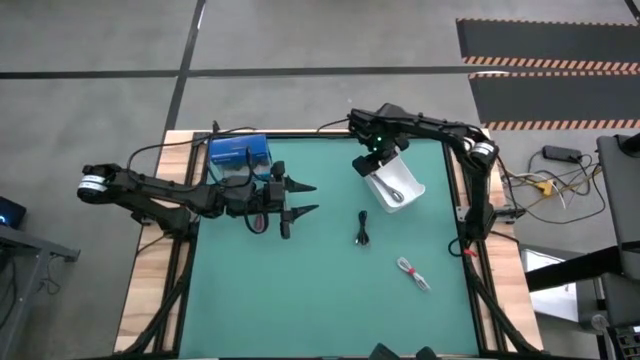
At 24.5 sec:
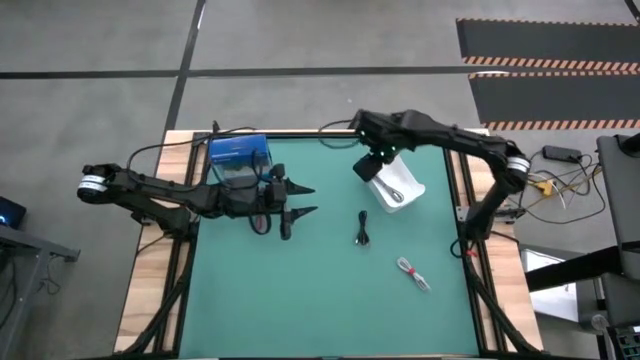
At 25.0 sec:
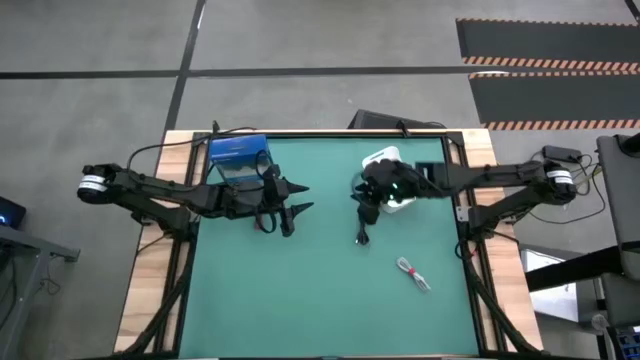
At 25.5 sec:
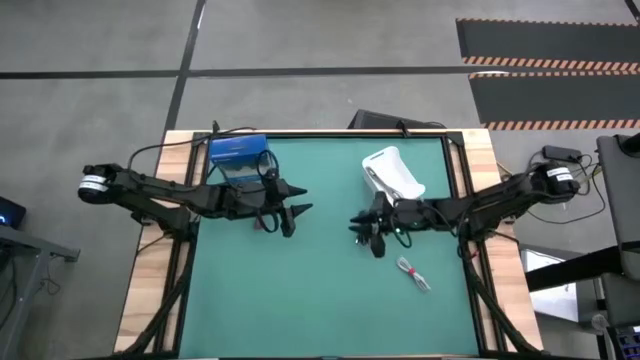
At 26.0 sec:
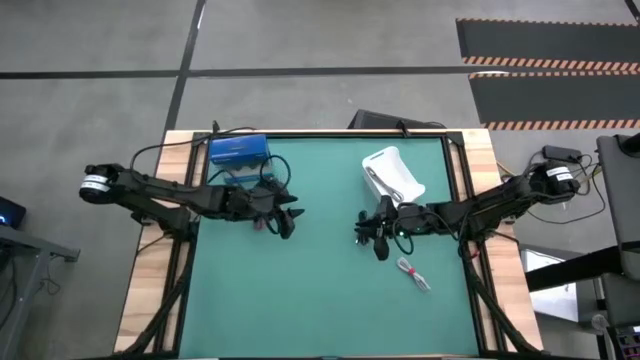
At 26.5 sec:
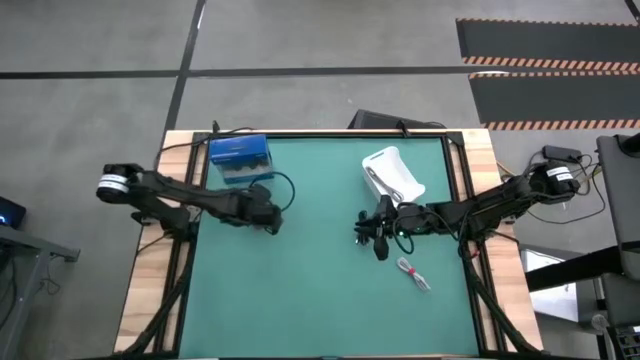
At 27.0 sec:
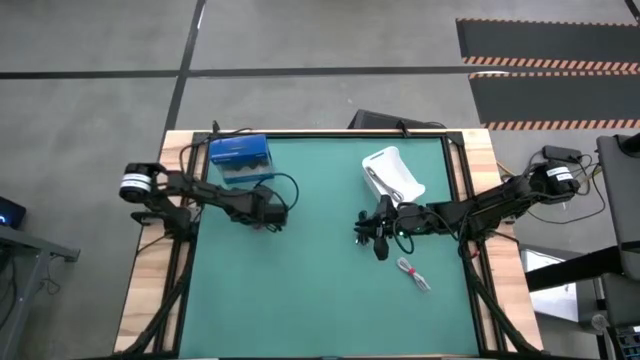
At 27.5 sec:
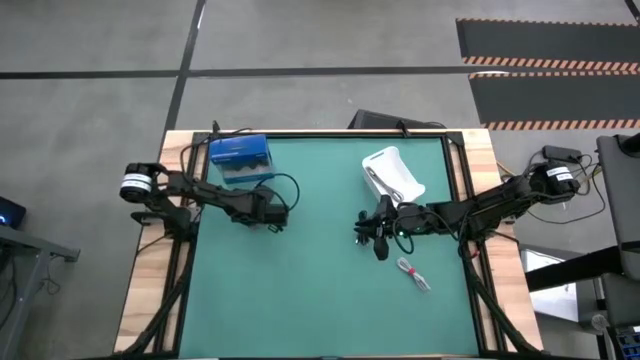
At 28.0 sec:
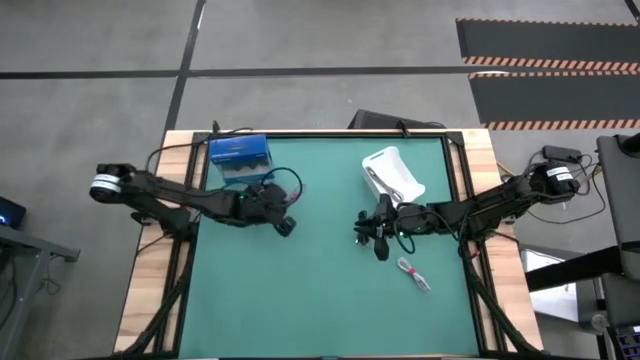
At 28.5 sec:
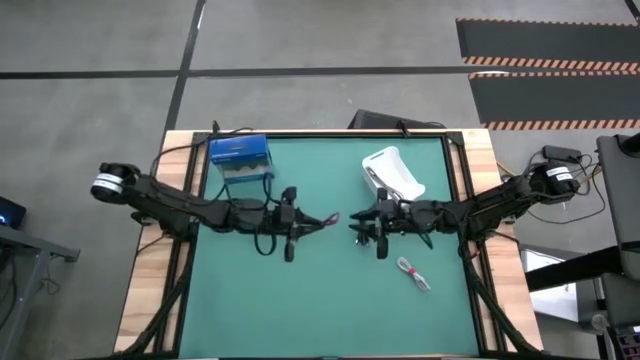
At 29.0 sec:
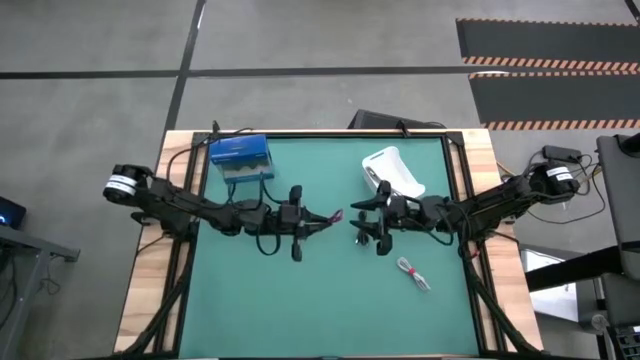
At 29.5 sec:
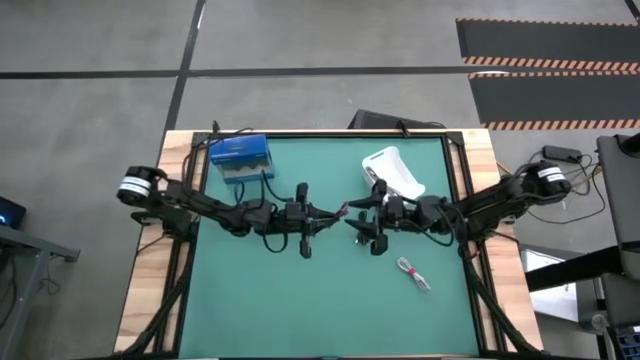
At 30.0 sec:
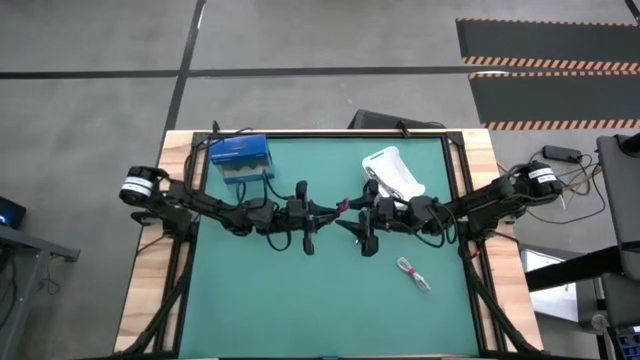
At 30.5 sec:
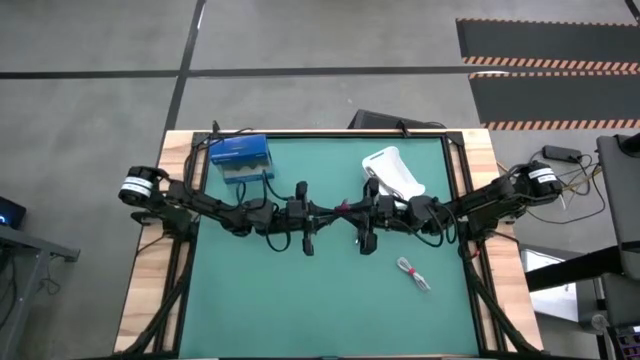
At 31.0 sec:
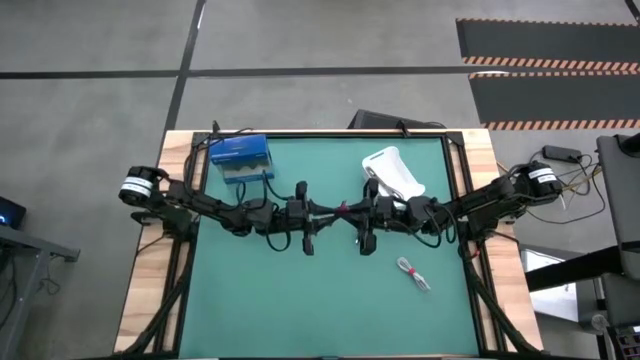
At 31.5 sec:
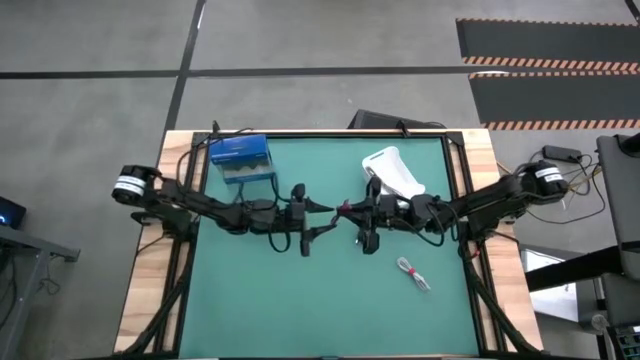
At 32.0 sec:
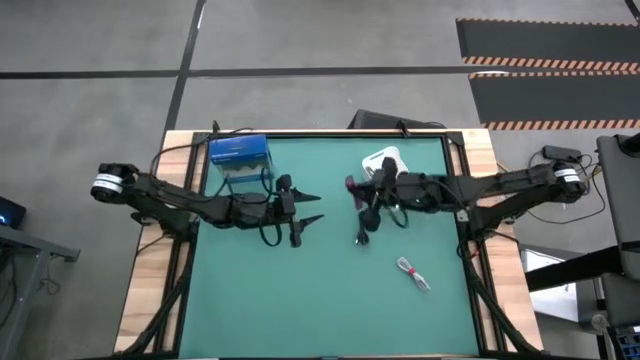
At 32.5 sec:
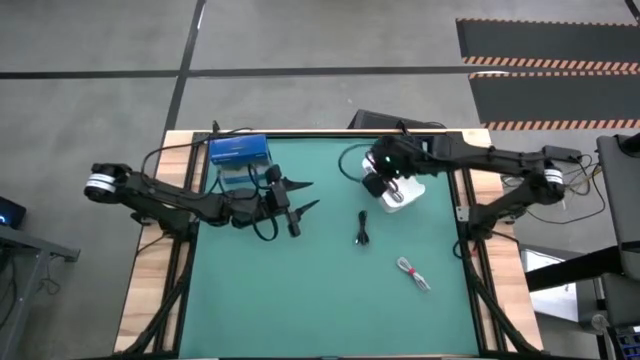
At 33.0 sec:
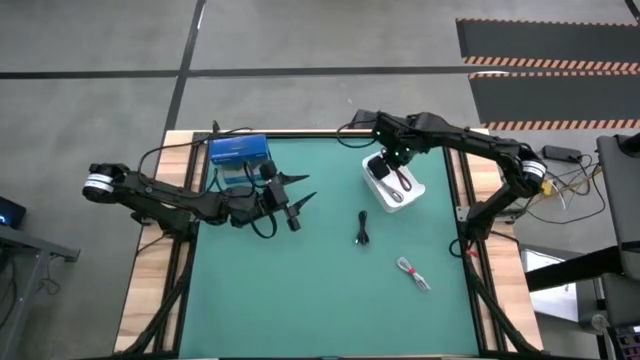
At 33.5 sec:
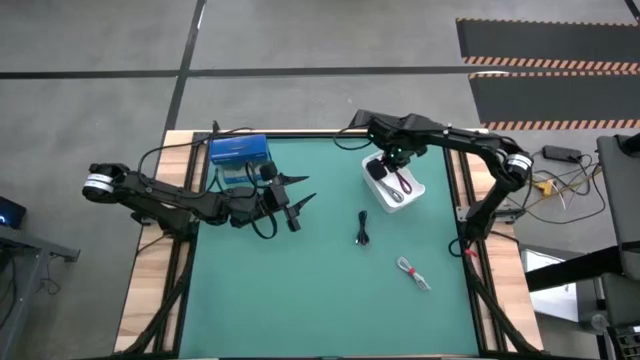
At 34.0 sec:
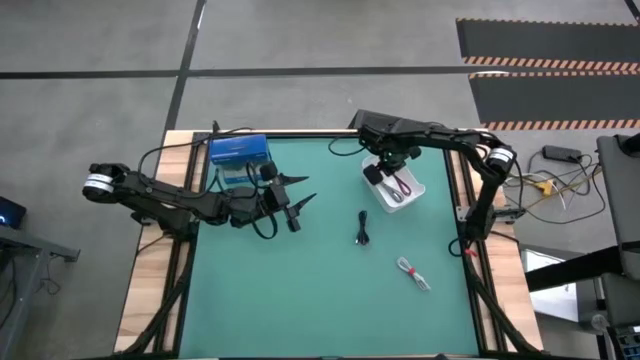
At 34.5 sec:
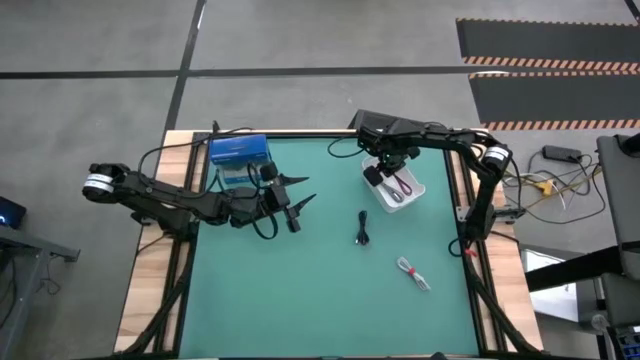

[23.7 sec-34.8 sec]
Task: Pick and place USB-C Cables
Put the pink charger cable into the white container

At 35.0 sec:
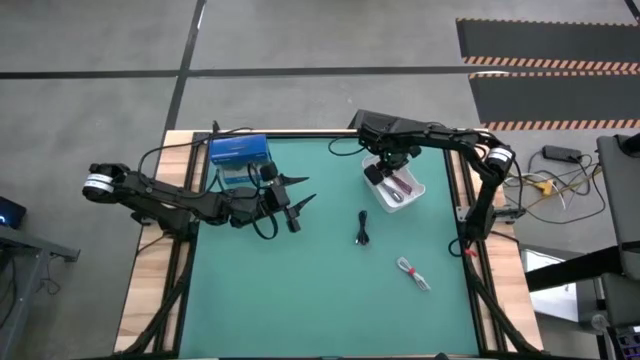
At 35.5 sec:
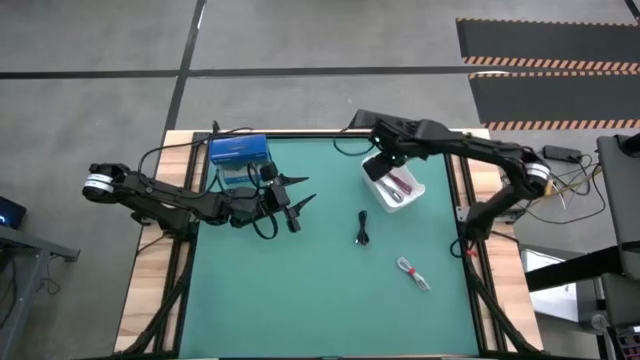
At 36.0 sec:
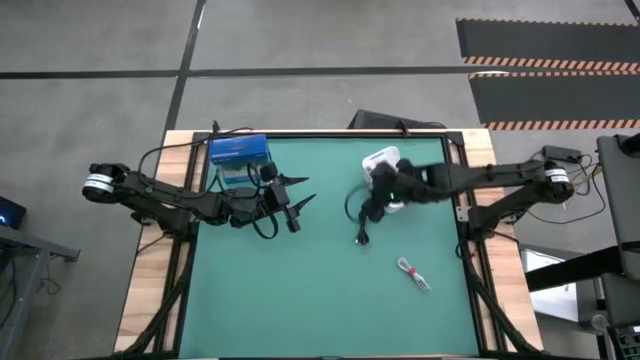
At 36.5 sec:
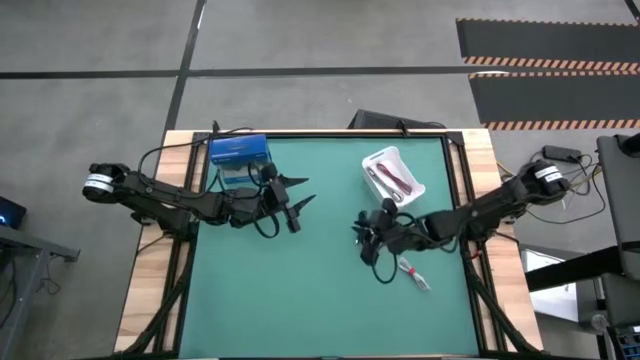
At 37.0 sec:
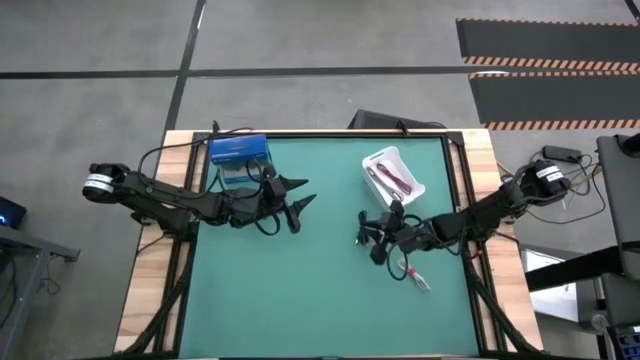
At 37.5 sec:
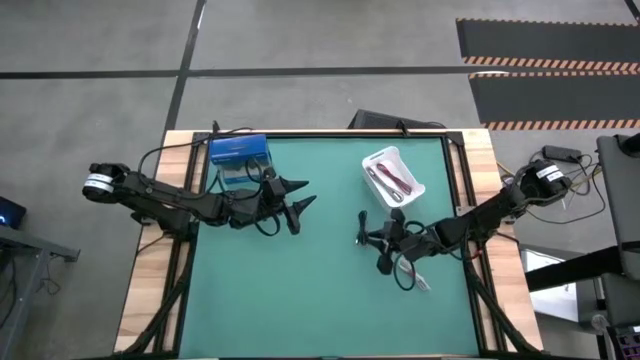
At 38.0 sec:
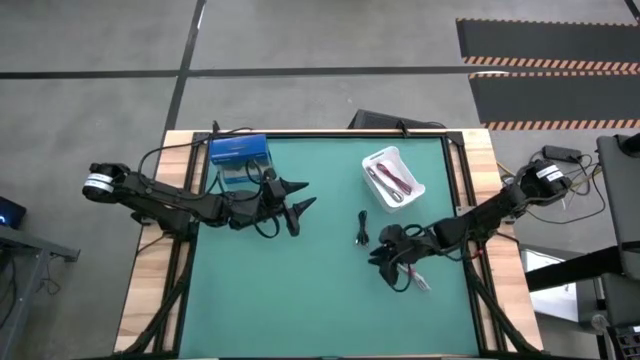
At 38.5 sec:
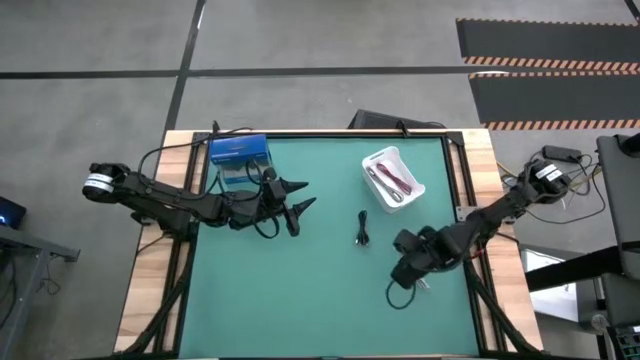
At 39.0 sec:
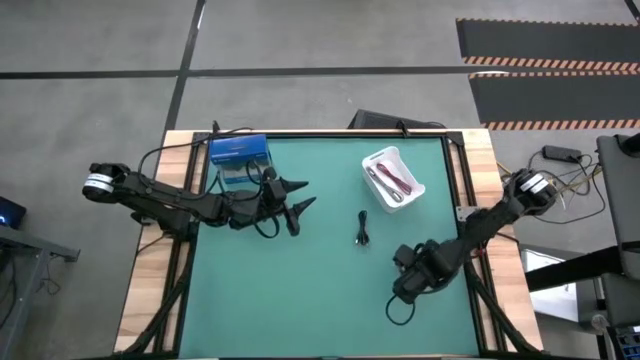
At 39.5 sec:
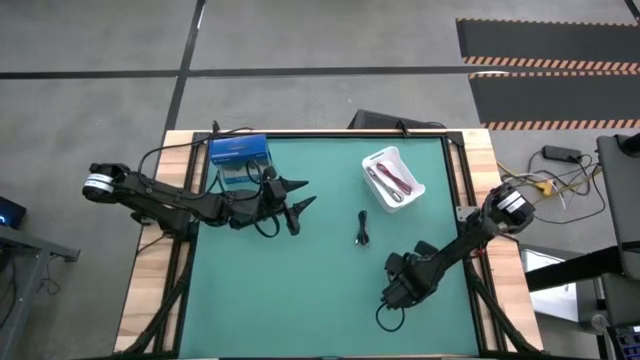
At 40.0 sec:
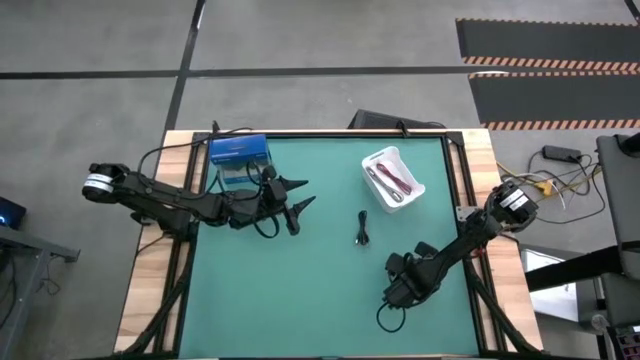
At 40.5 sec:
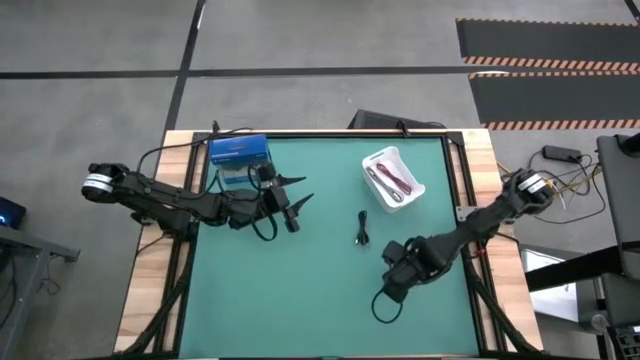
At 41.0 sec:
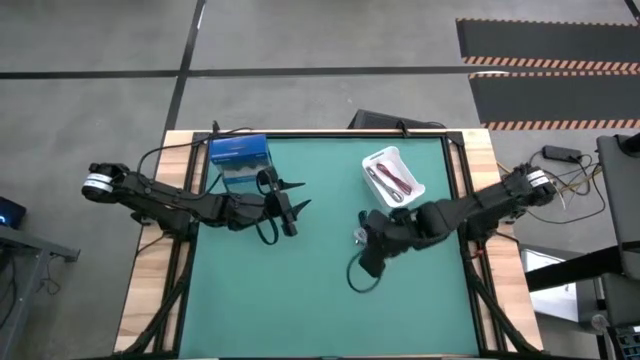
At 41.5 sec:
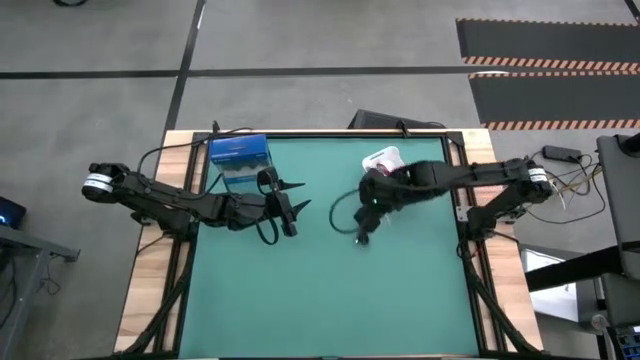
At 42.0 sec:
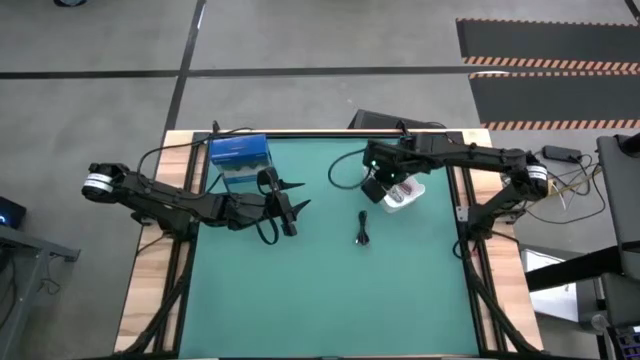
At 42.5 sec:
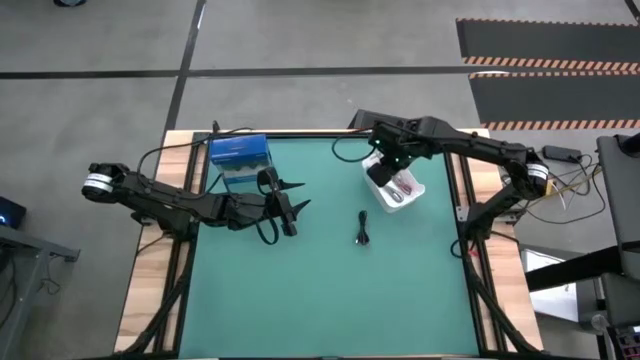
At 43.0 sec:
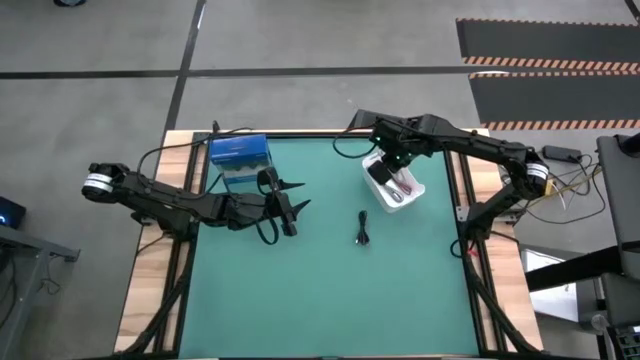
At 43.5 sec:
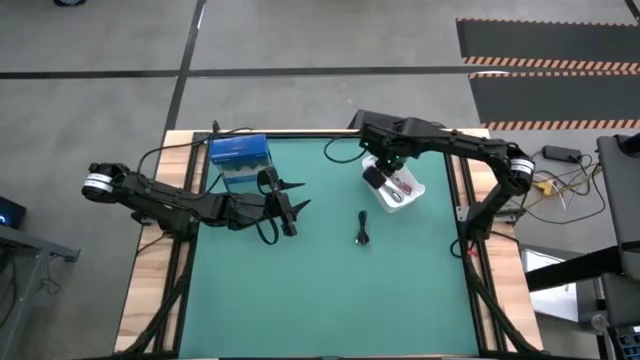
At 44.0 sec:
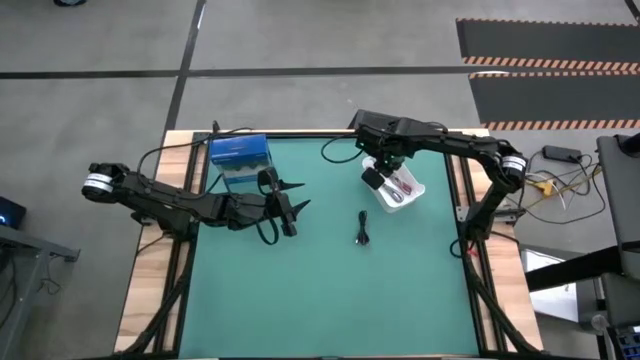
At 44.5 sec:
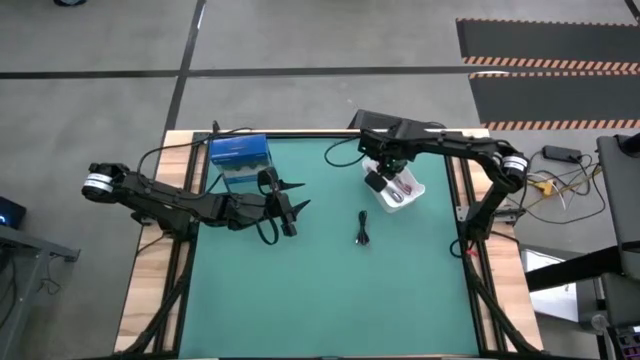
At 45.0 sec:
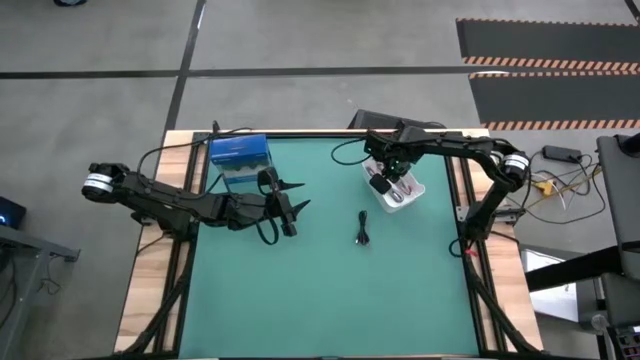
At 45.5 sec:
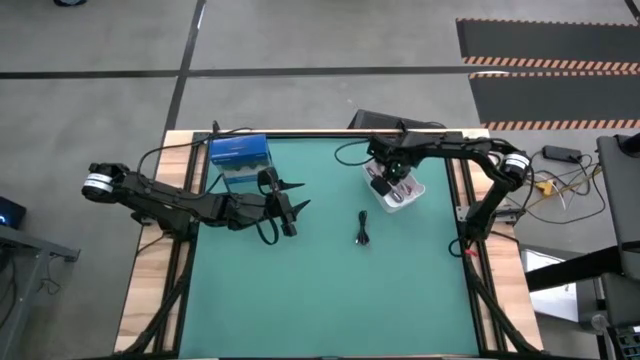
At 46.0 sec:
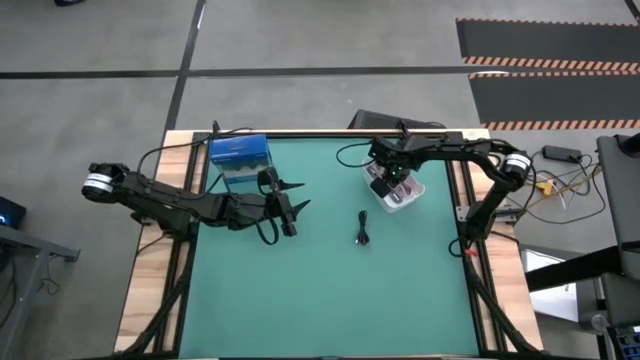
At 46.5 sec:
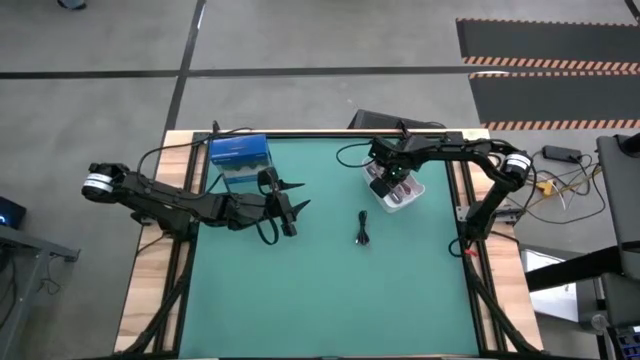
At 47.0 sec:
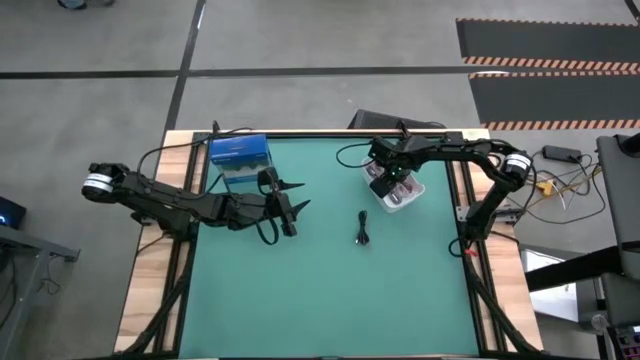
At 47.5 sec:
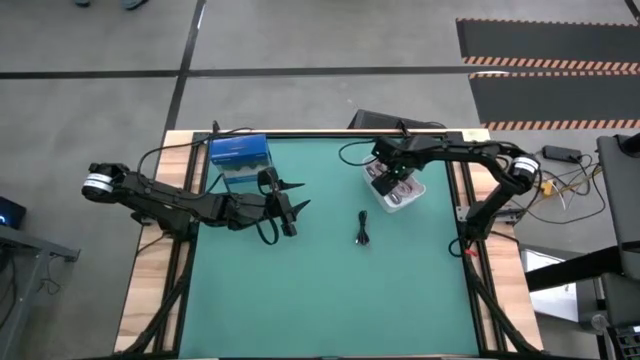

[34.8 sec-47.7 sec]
Put the white charger cable into the white container
